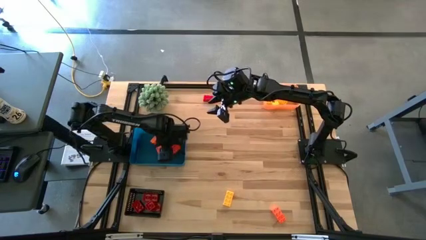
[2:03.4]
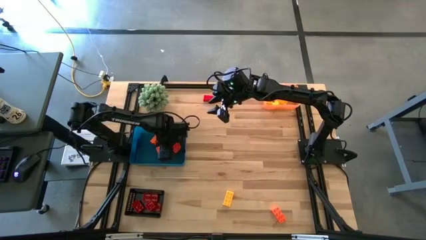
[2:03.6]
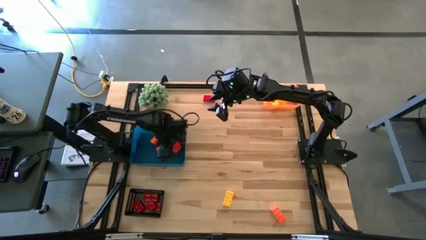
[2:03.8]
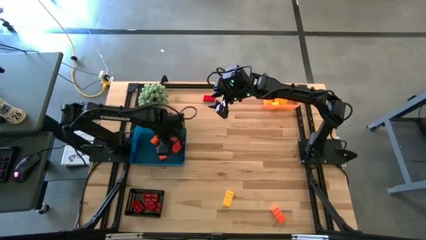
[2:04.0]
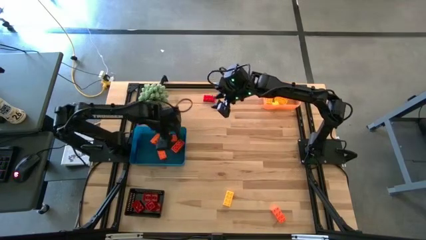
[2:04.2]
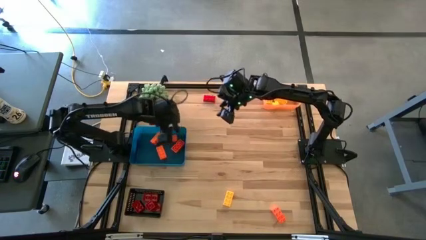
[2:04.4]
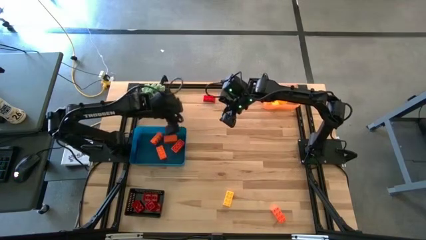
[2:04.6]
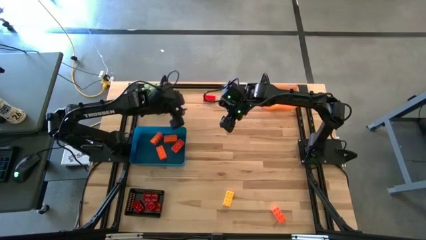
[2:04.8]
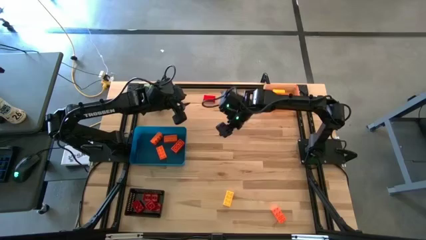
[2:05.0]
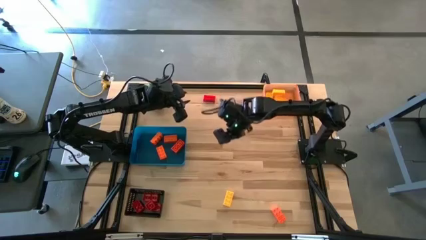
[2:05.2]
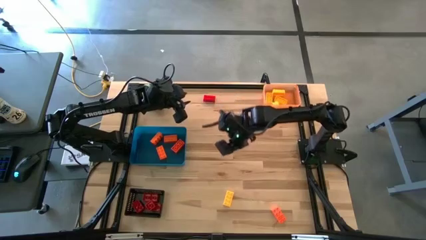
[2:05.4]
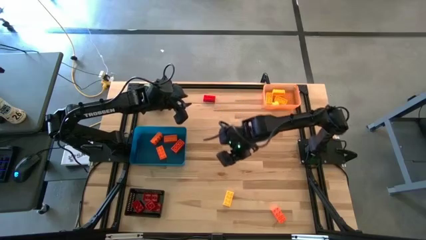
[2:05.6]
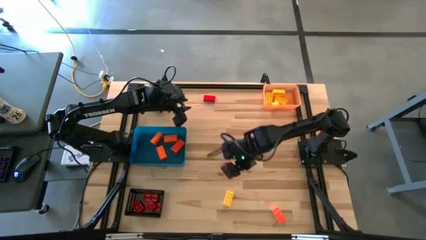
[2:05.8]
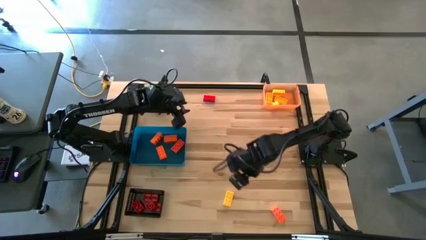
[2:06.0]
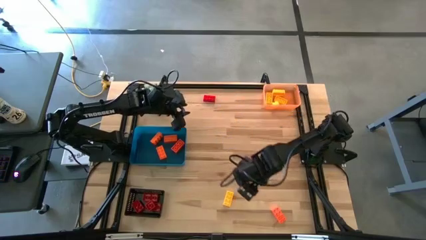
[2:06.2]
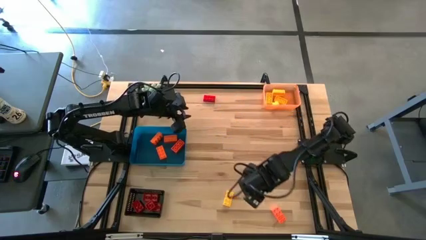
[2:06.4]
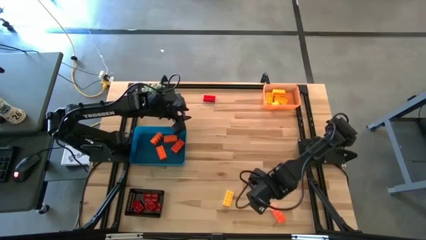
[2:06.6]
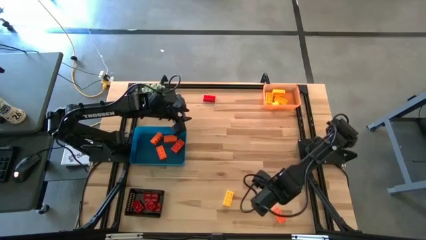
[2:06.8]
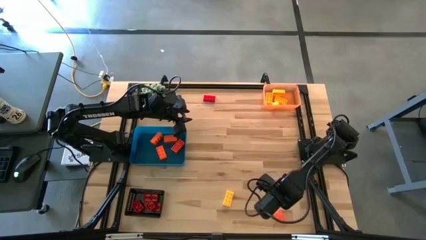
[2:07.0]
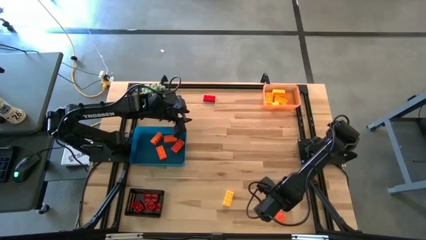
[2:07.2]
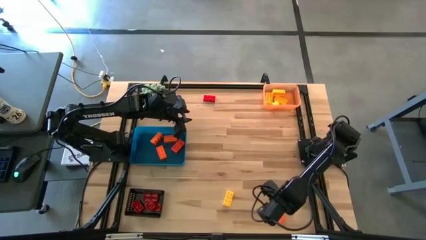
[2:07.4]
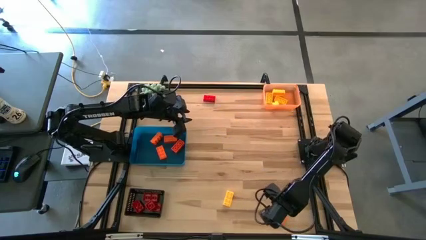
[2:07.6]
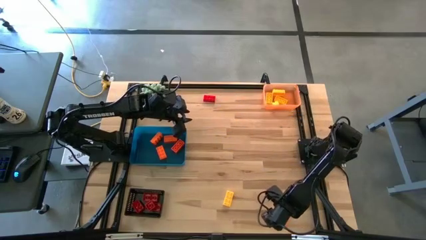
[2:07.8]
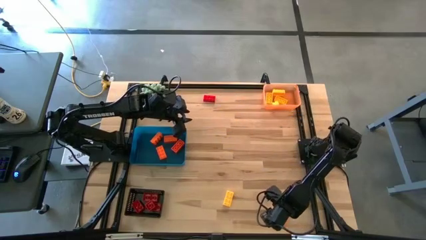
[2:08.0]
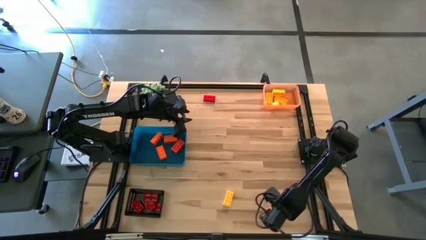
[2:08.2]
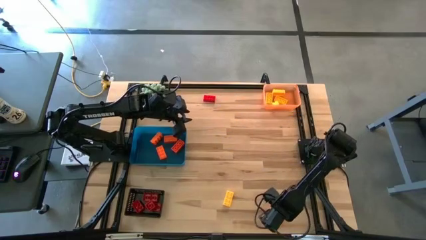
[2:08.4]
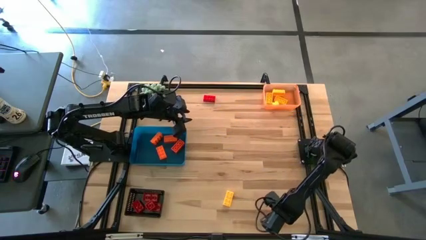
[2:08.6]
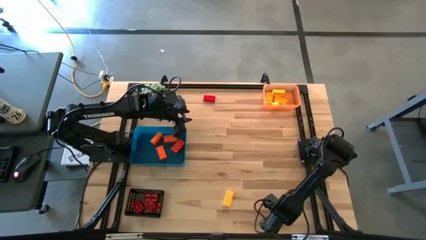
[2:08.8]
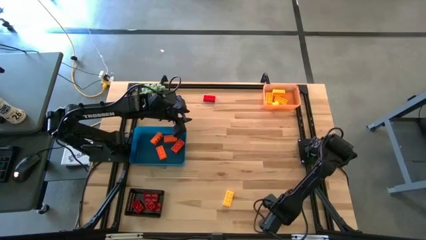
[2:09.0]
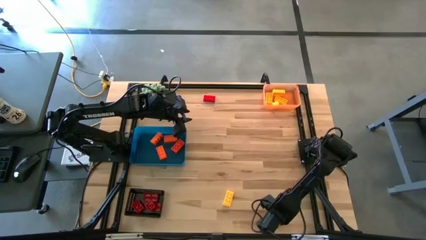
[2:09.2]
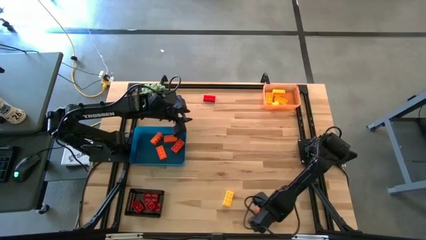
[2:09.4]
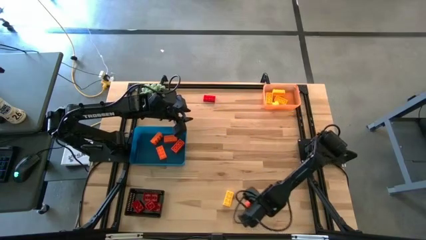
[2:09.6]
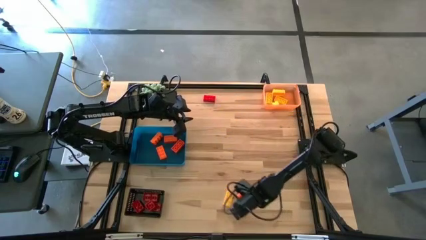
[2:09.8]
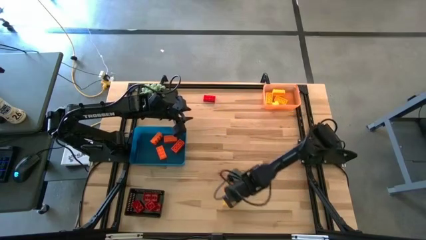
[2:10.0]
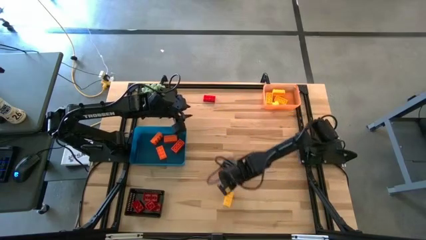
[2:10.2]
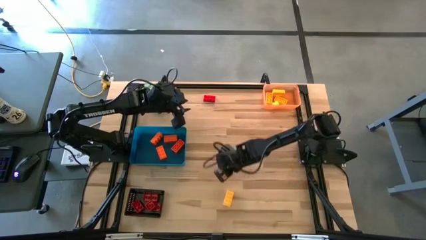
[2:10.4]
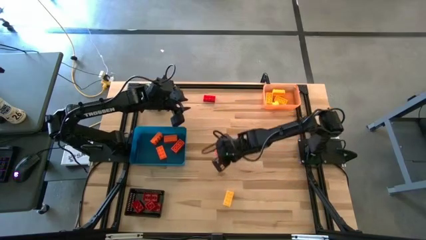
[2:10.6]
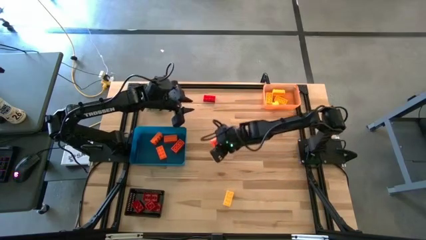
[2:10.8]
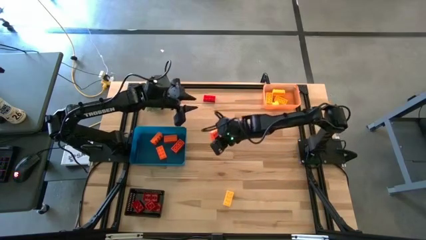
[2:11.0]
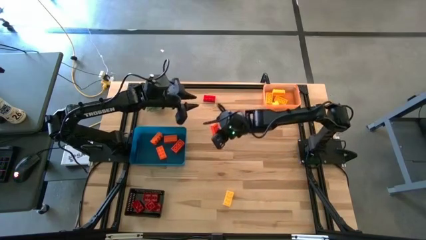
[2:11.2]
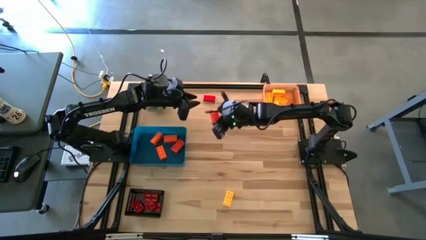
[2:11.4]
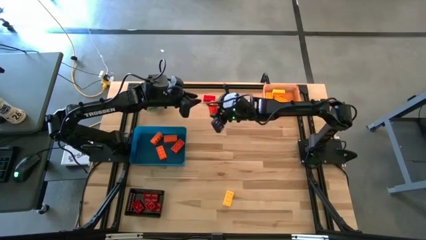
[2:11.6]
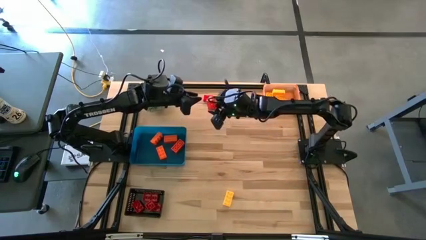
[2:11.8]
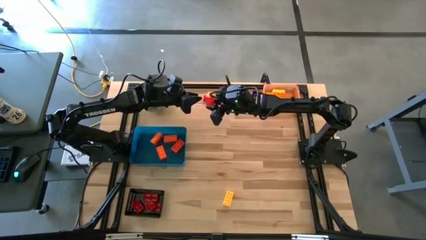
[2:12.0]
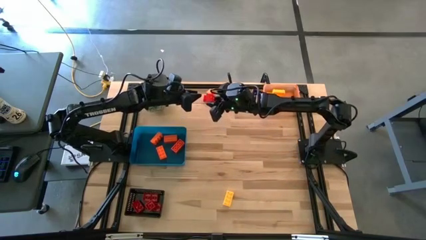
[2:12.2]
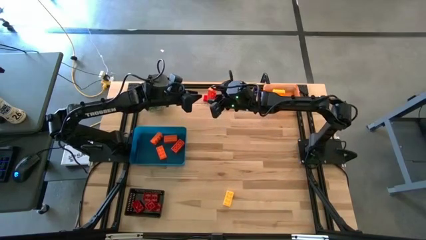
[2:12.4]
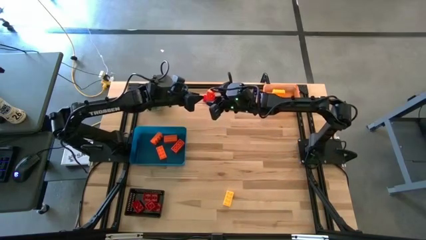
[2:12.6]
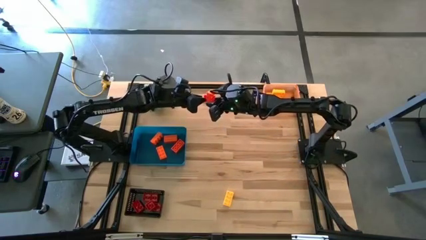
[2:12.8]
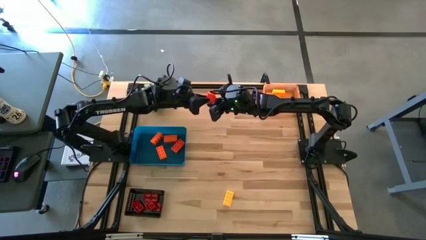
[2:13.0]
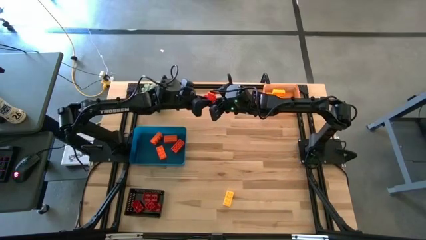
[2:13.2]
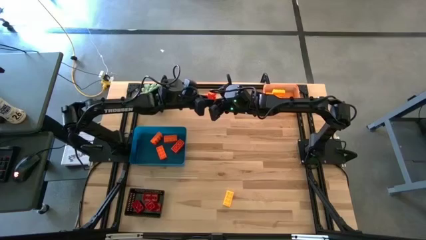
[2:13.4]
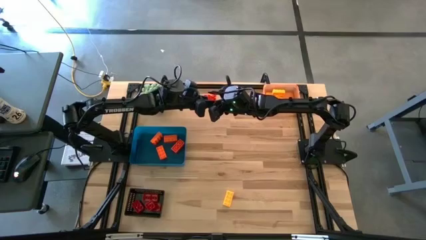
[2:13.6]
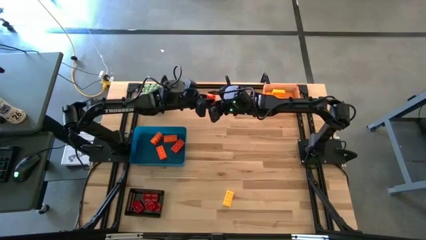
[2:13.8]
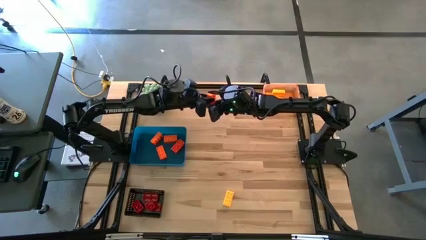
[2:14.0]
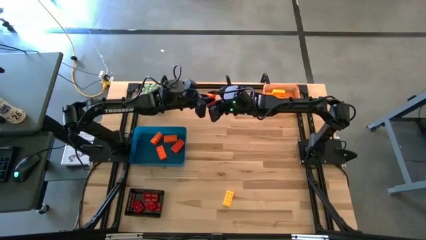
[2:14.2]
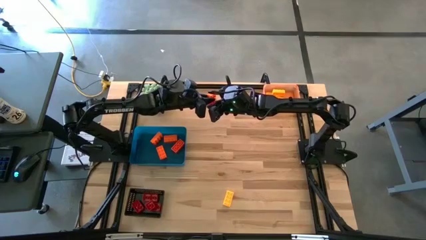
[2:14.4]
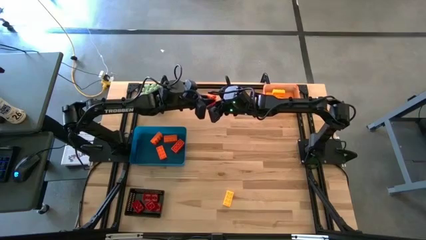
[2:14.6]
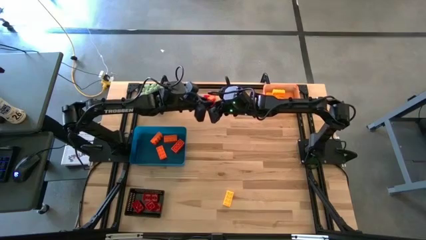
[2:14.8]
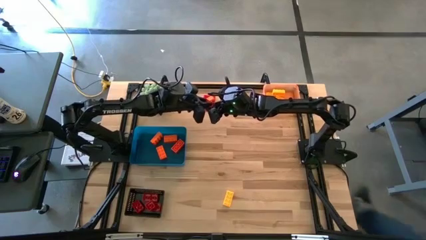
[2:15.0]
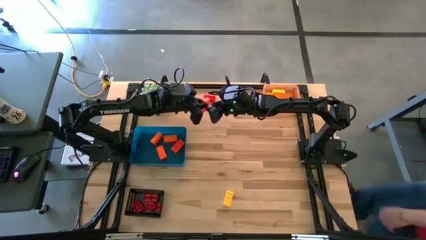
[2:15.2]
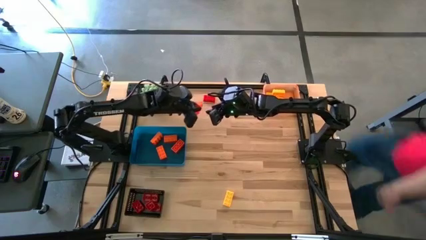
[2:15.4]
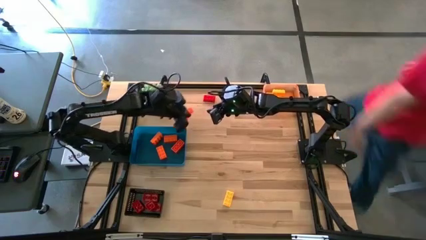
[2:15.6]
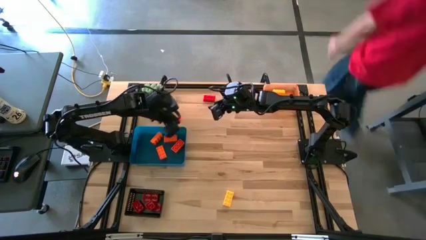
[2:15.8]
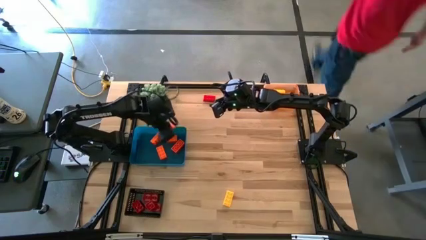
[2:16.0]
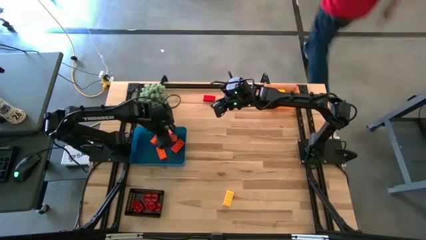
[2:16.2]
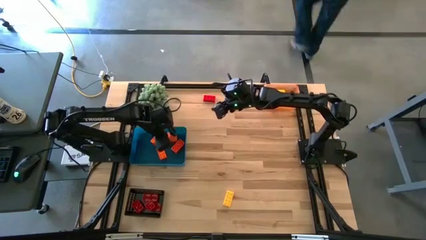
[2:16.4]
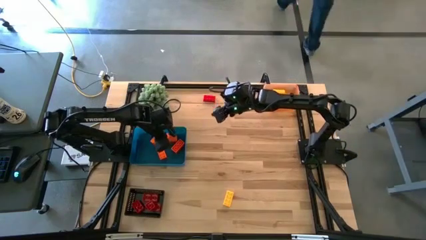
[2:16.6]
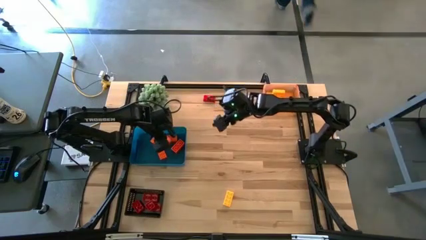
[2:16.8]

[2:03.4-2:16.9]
Task: Sort & place blocks by color
Put the orange game piece into the blue bin

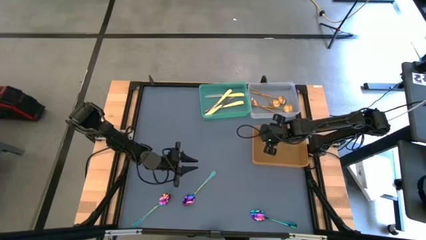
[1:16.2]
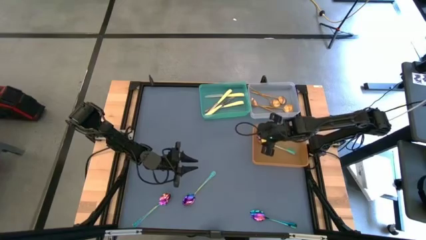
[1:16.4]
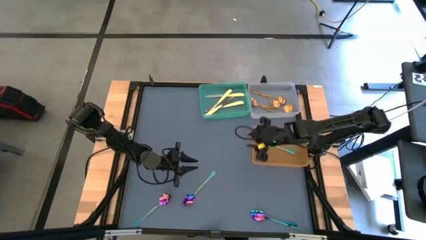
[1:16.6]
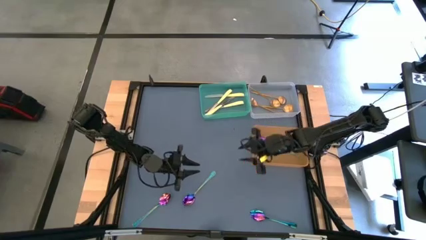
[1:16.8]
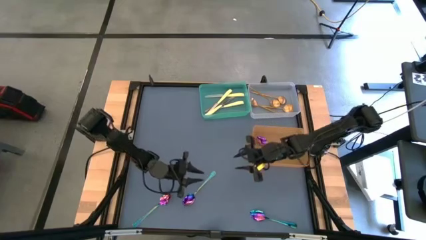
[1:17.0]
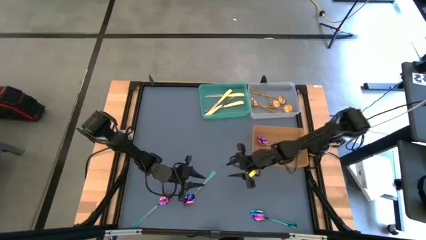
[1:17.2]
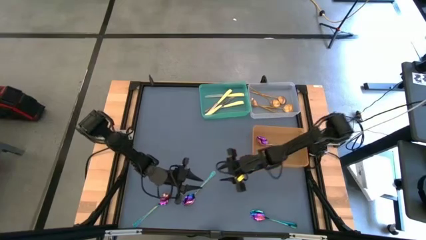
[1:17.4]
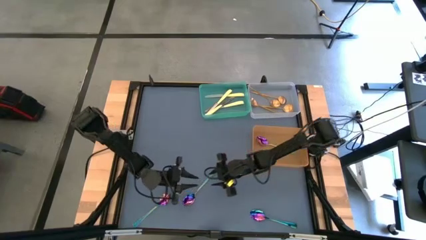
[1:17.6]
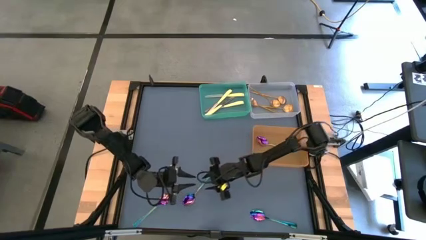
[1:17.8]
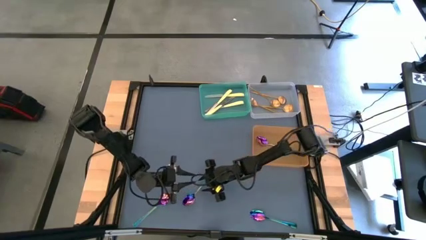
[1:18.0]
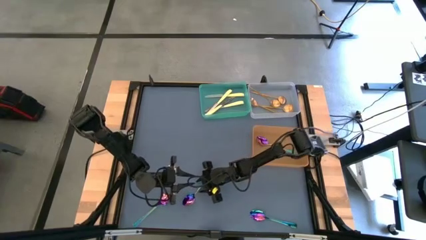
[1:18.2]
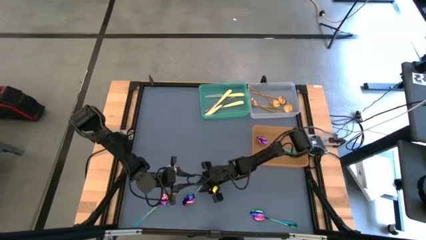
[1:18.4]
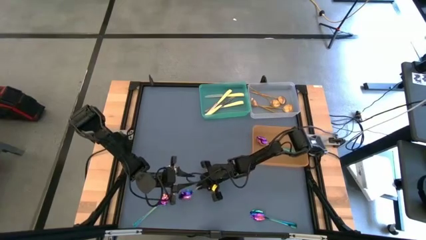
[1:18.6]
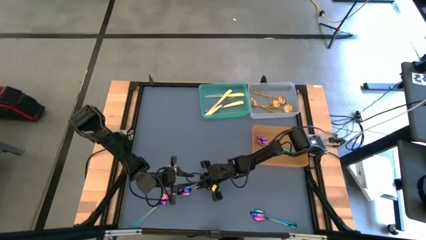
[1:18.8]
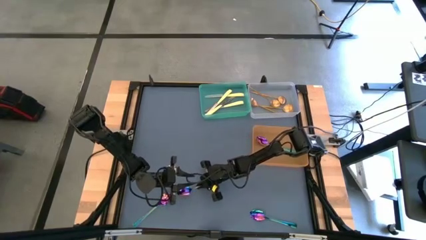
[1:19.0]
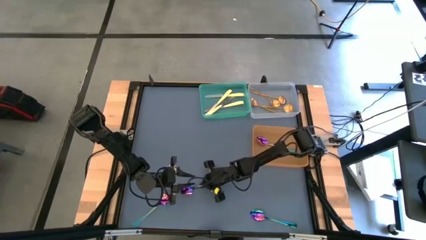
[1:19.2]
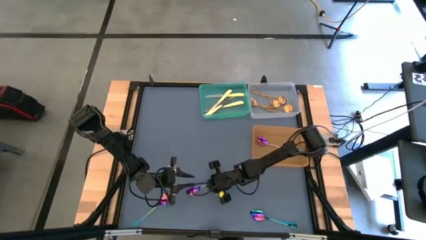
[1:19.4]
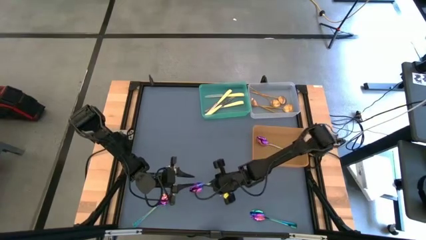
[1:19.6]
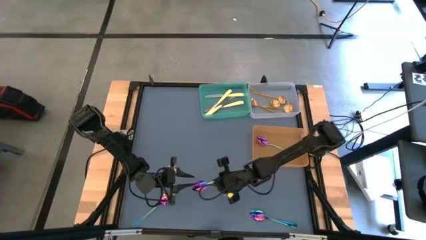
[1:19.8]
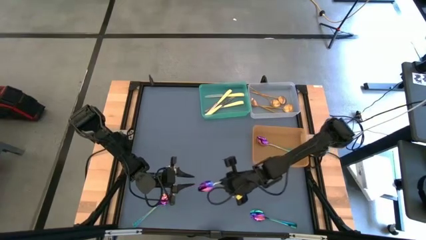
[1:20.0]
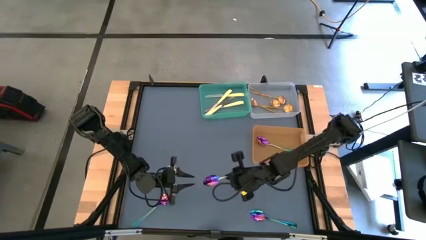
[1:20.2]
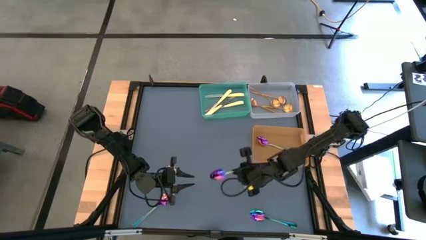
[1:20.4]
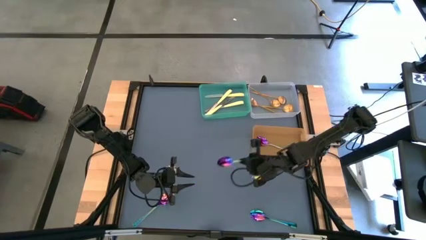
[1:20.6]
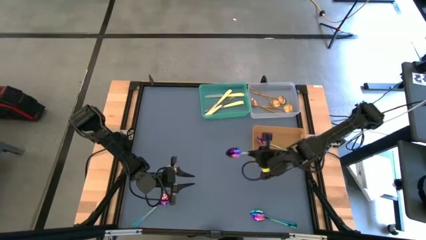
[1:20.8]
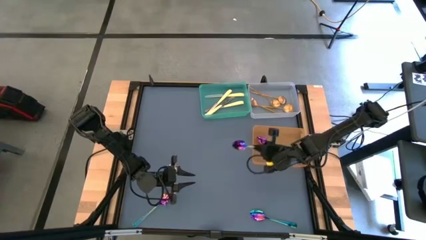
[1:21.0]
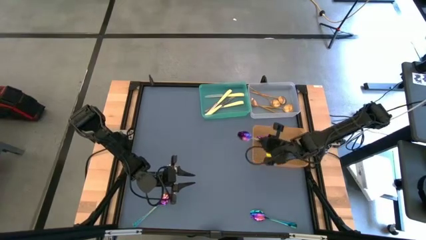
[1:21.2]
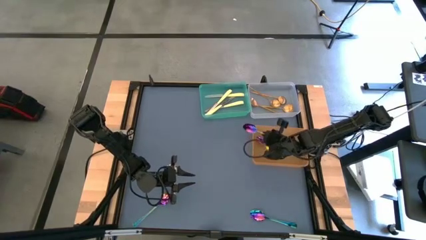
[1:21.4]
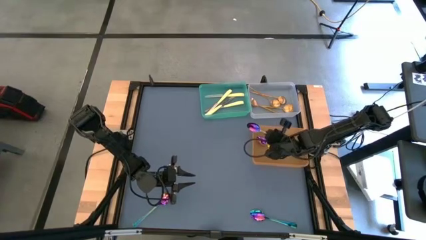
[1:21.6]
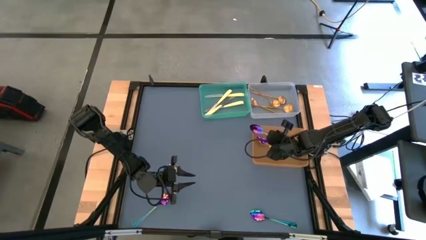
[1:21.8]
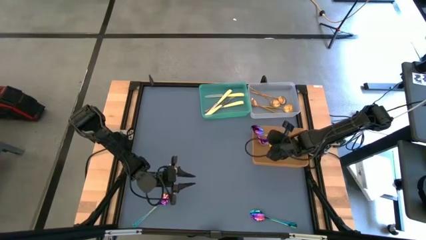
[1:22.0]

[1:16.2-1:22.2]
Task: Sort silverware by color (type)
Put the iridescent spoon into the orange bin
